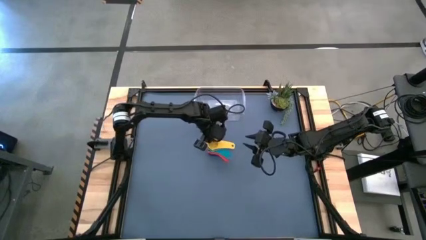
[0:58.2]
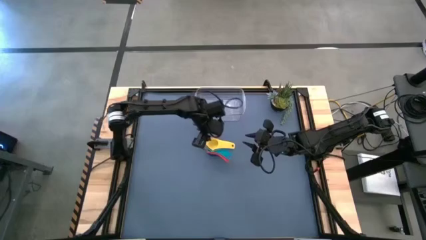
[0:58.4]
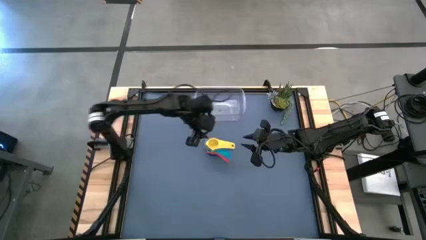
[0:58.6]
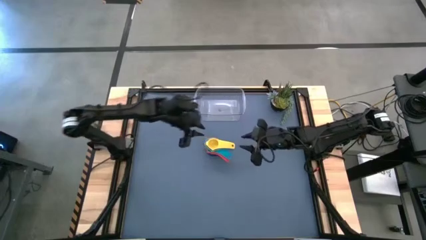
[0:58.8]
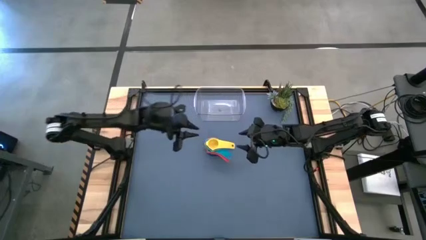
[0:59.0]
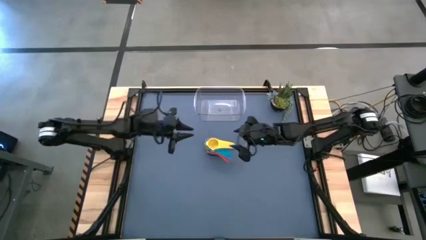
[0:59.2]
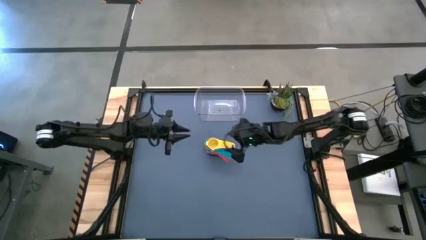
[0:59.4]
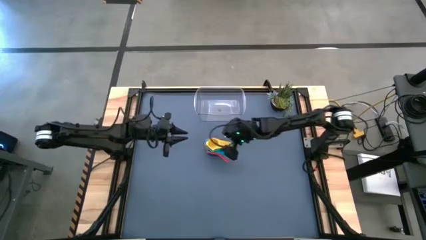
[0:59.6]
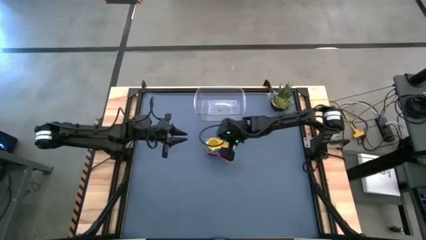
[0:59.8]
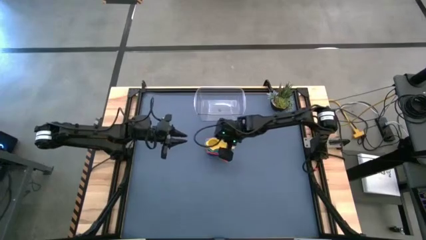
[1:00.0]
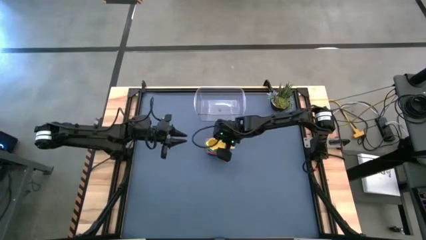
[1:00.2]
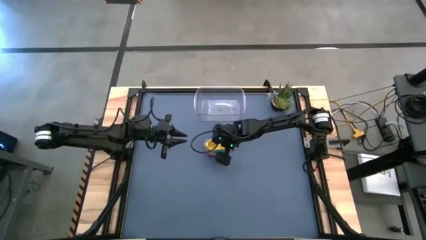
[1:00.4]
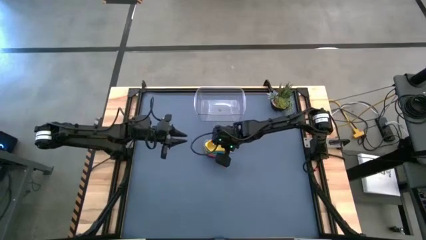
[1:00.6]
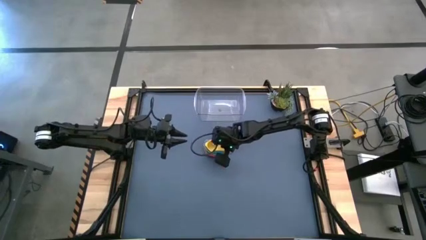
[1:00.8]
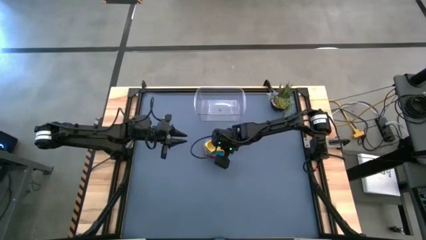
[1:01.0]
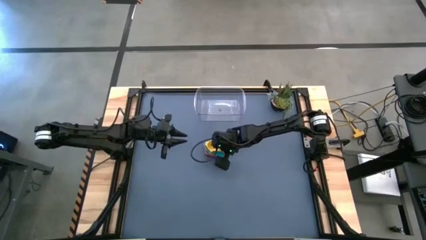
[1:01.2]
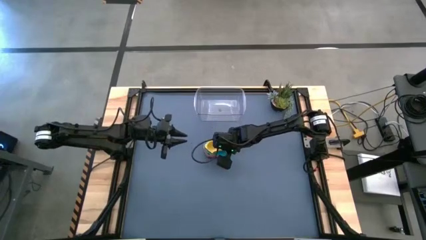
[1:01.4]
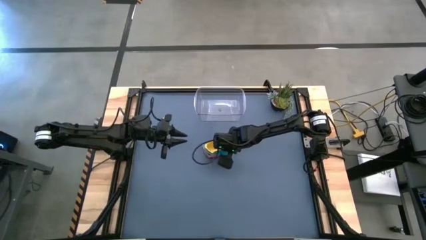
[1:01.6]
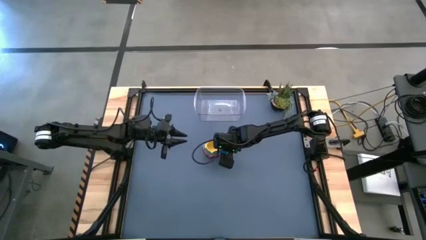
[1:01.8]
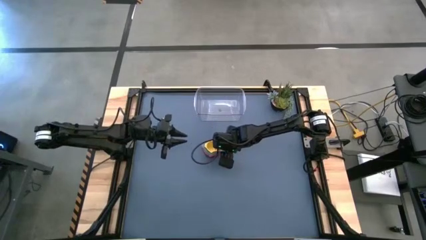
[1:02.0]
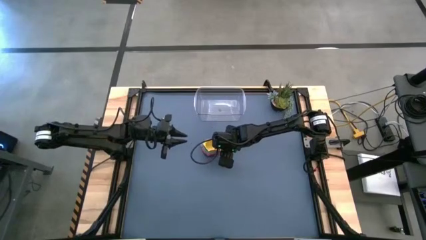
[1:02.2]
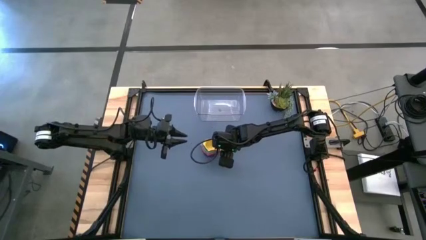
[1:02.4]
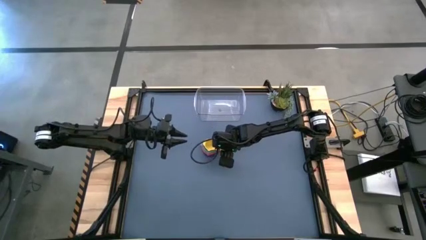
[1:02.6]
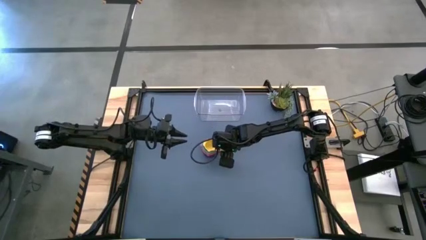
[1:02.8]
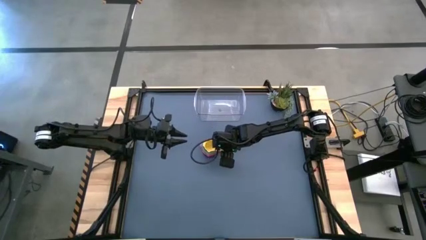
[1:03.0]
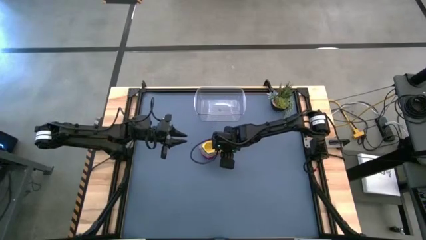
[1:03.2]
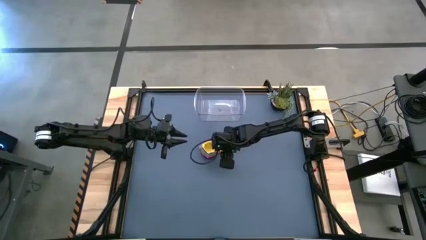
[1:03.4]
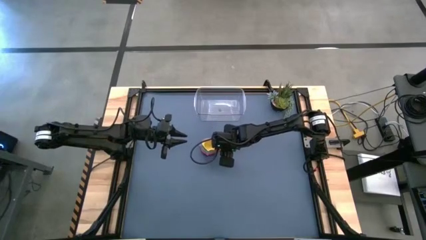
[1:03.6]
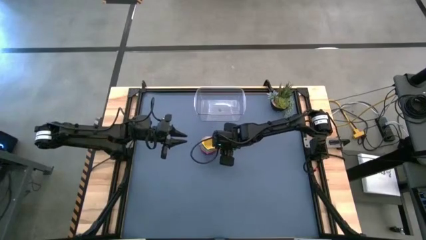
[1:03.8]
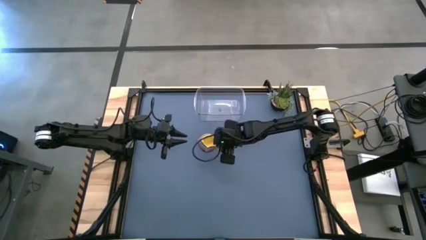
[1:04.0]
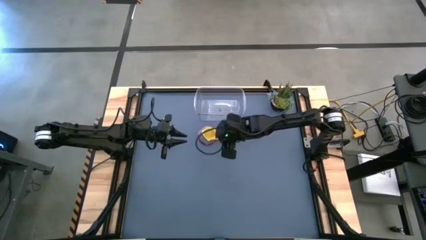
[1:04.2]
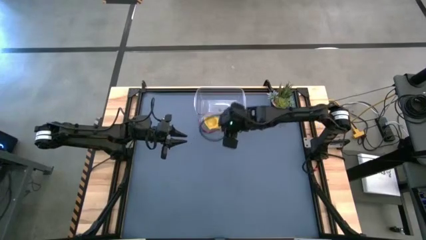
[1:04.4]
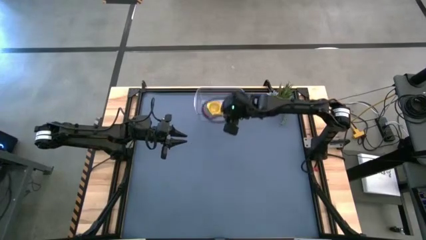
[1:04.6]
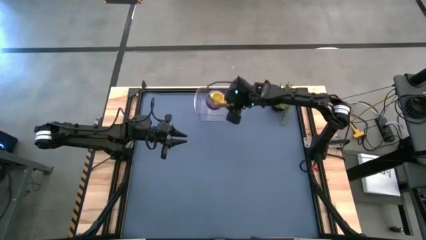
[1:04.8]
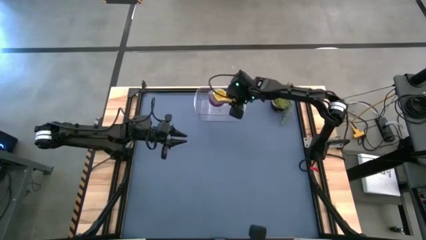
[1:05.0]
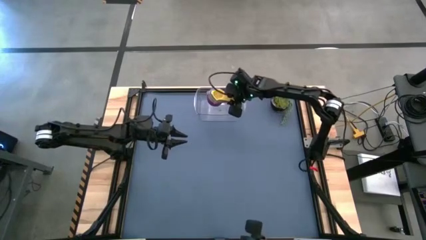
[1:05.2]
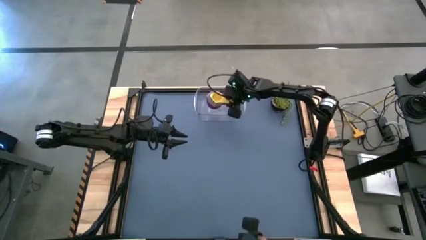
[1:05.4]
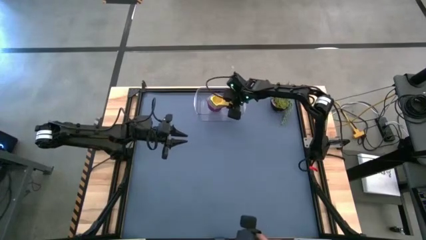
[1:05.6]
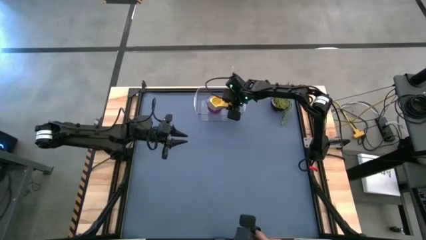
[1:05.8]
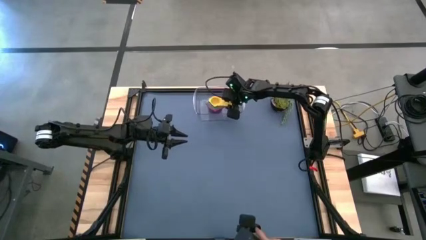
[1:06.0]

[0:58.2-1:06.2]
Task: Nest measuring cups in basket
Put the stacked measuring cups into the transparent bin

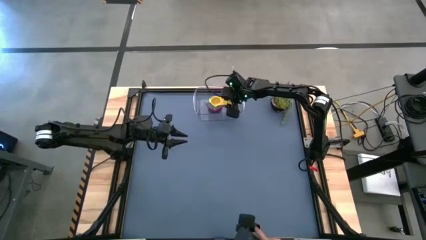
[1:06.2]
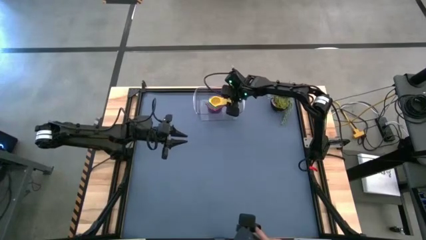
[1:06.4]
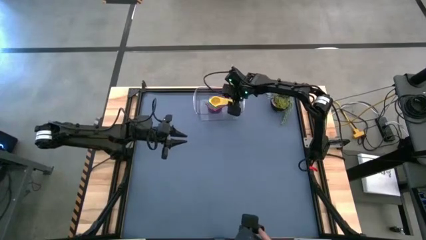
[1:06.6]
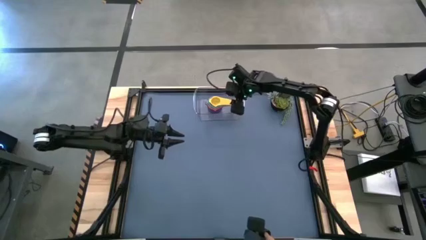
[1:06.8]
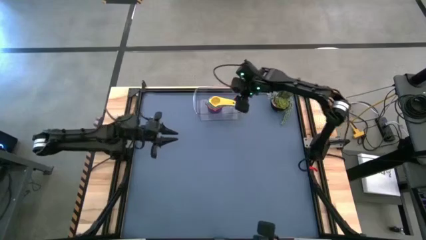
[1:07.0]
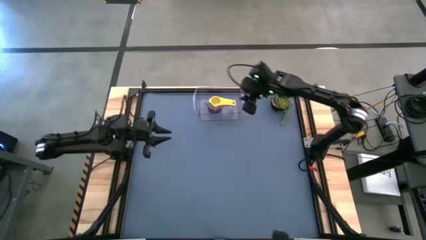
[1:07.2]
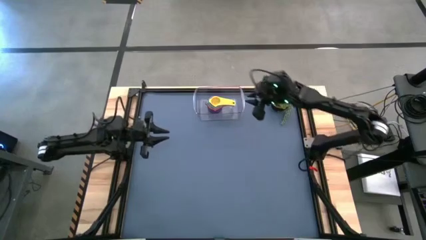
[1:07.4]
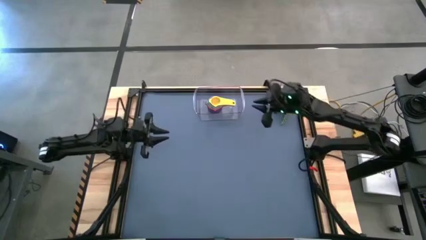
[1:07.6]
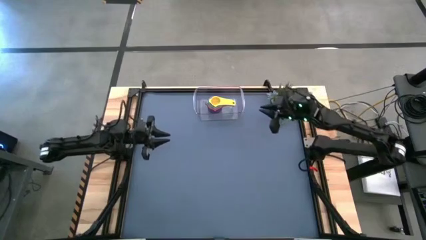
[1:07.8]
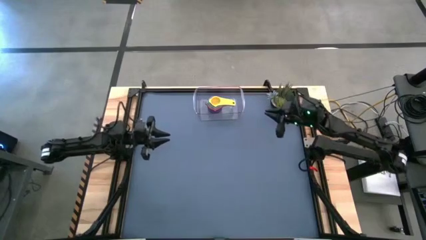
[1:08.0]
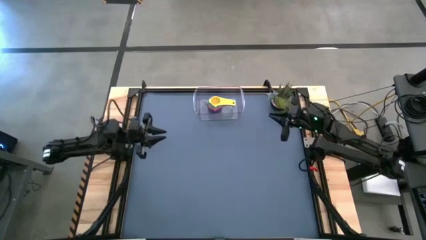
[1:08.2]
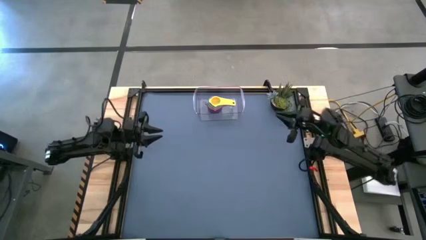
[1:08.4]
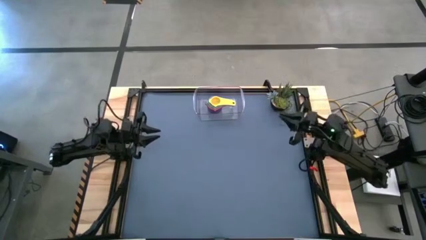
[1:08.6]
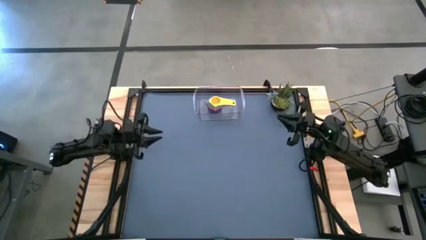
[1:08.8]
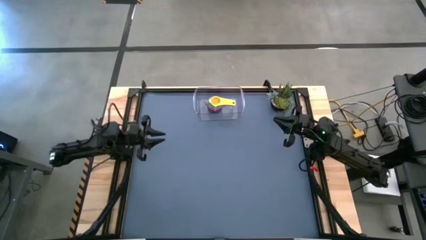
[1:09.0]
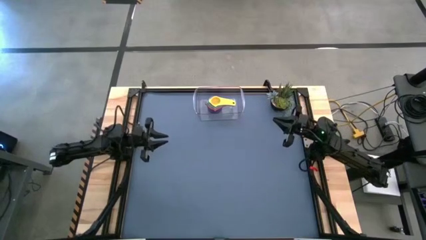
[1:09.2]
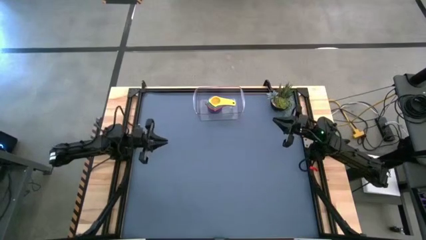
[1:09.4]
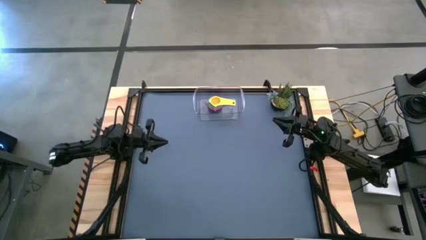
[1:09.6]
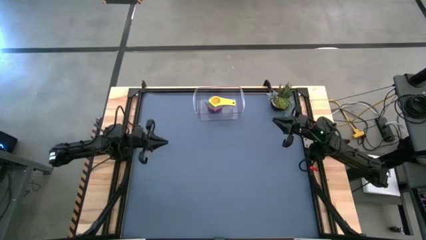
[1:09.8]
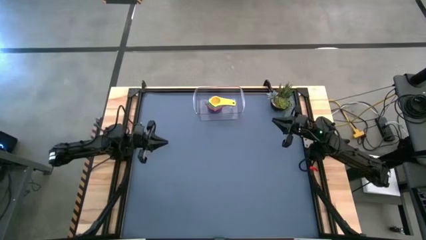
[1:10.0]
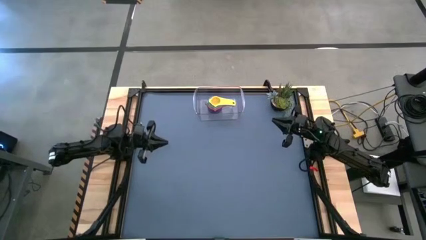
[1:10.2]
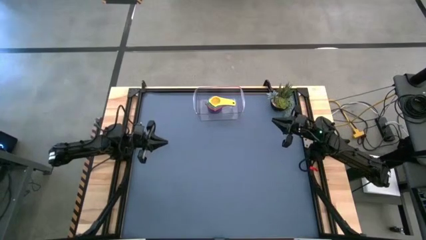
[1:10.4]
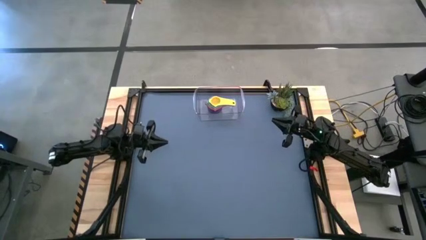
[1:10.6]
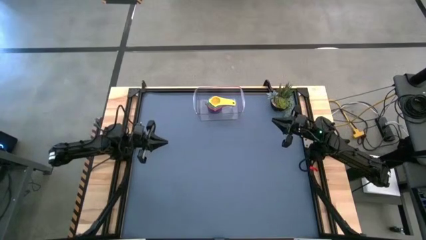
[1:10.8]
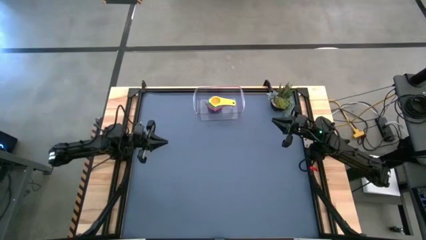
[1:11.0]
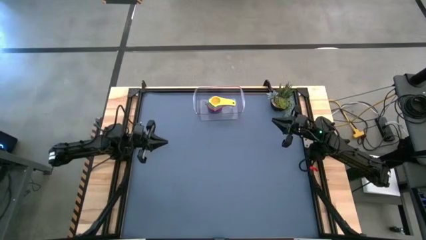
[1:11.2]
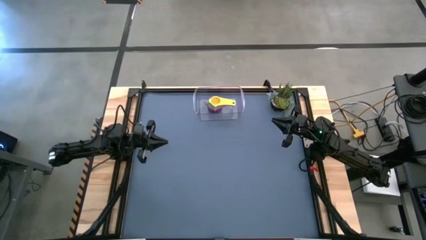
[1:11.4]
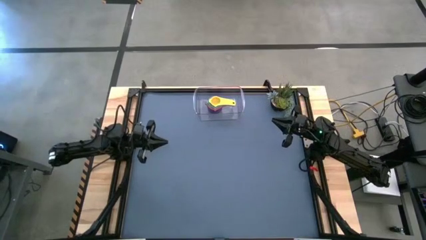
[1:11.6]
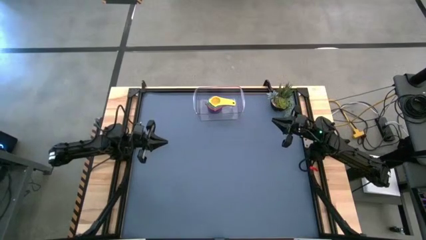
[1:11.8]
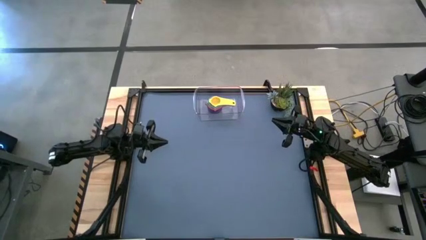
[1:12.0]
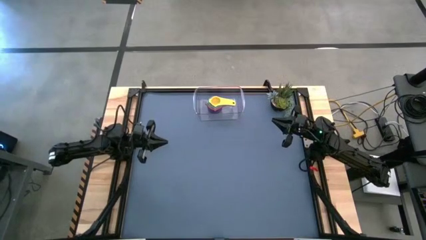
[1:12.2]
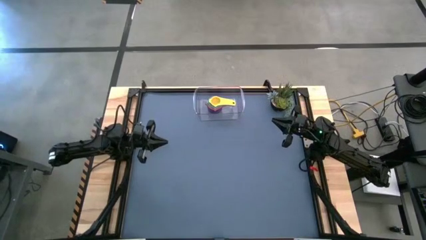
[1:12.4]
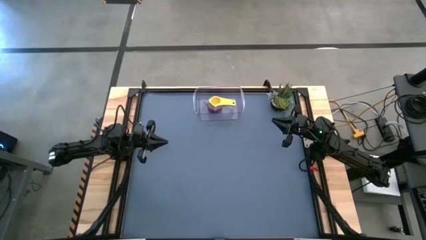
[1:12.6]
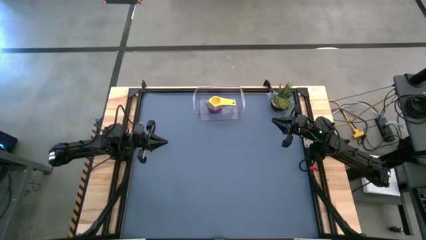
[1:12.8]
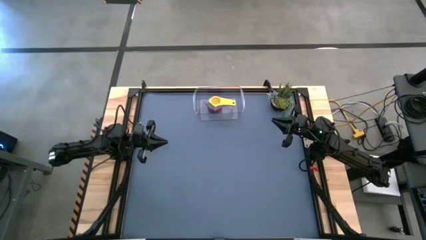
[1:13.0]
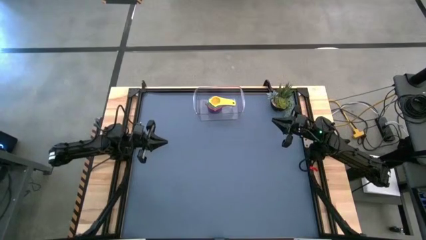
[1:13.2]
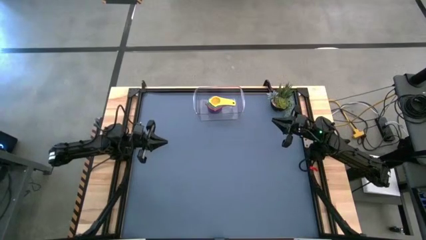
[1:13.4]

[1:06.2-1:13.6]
Return to Home Position
